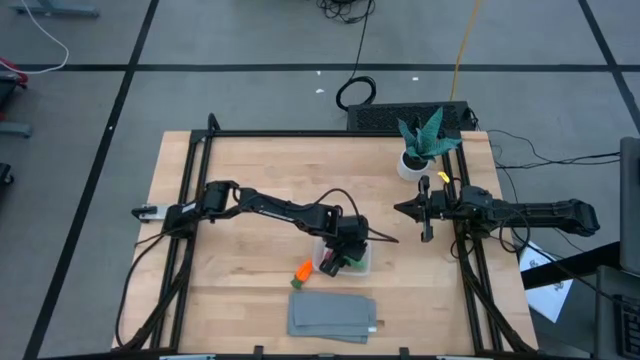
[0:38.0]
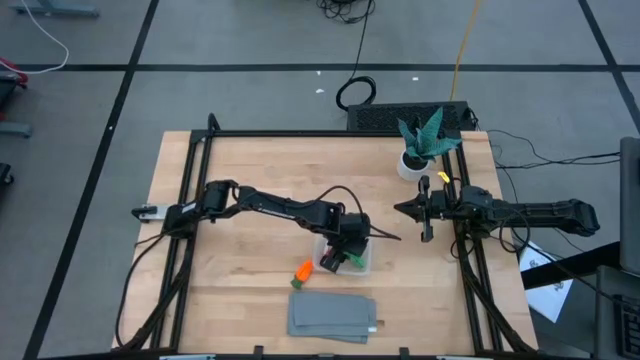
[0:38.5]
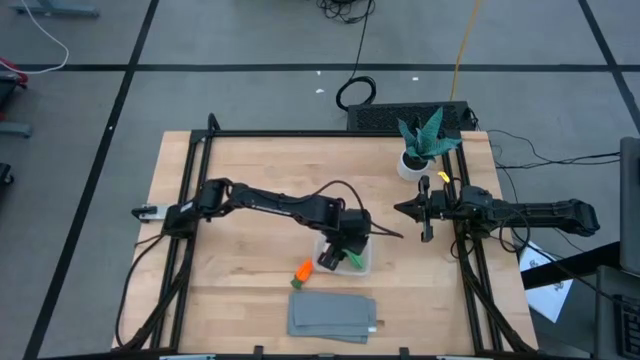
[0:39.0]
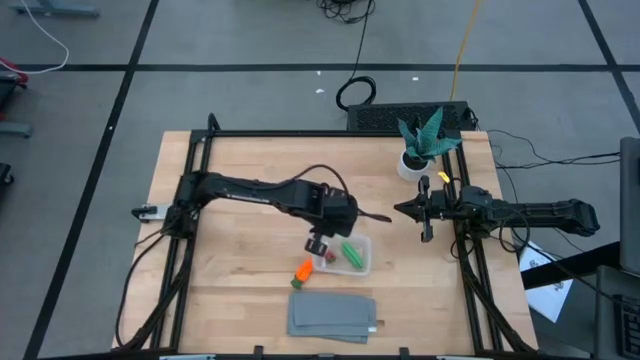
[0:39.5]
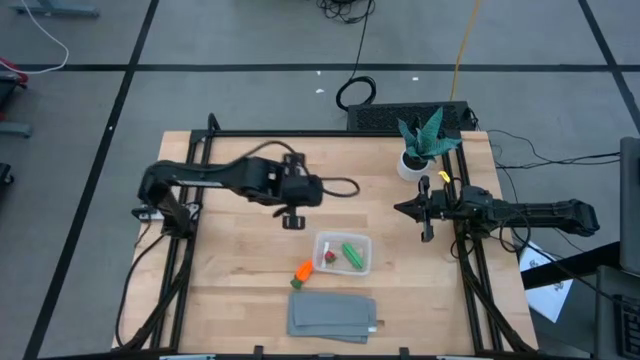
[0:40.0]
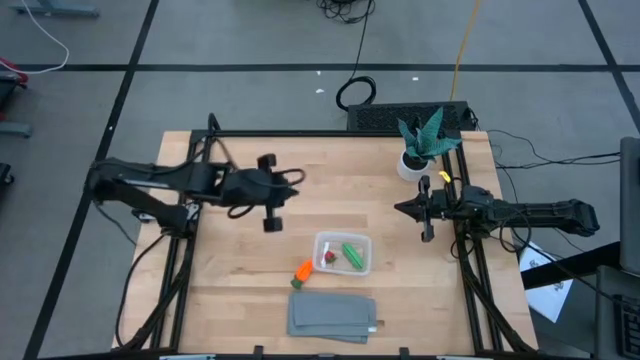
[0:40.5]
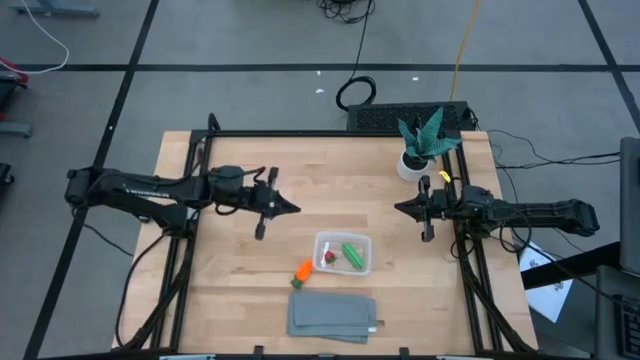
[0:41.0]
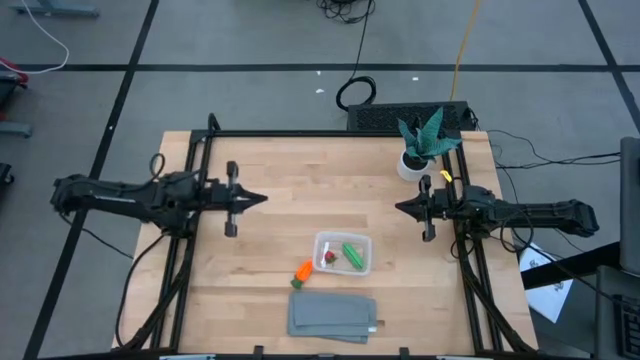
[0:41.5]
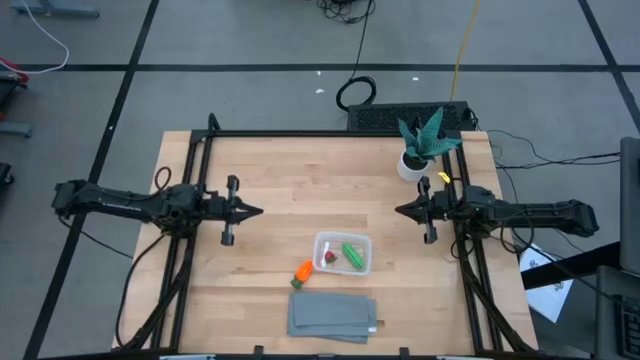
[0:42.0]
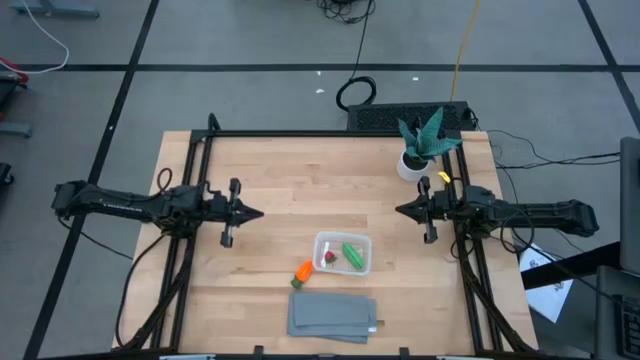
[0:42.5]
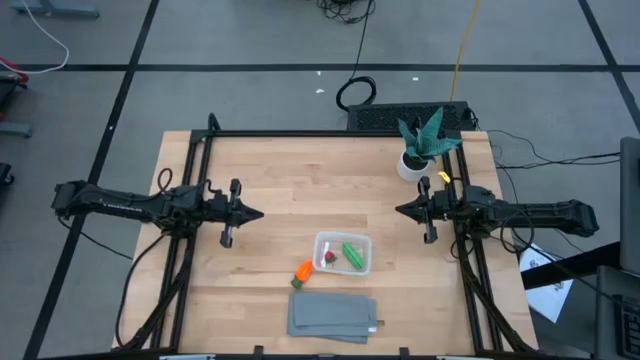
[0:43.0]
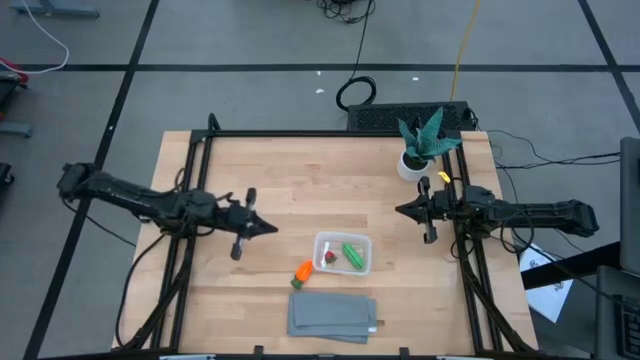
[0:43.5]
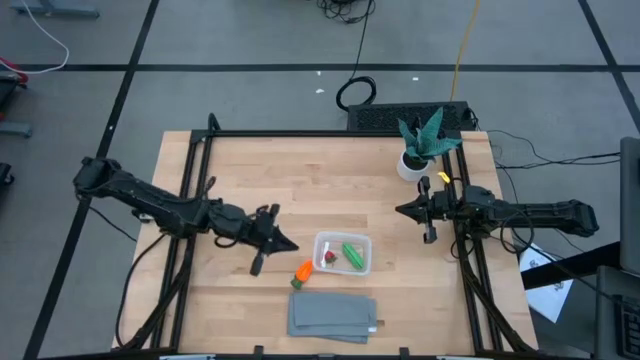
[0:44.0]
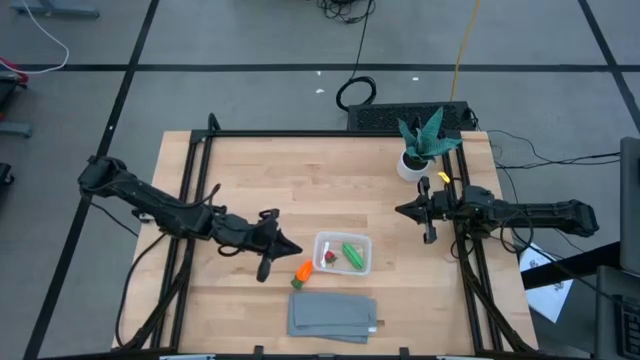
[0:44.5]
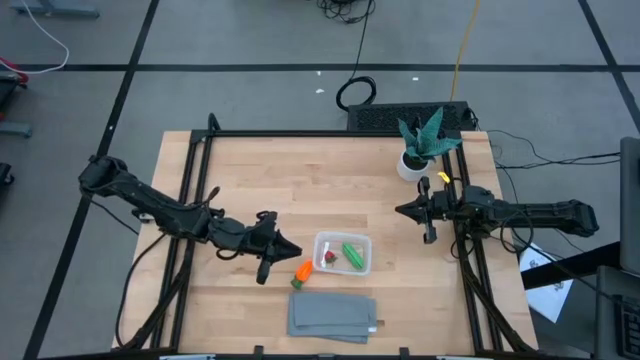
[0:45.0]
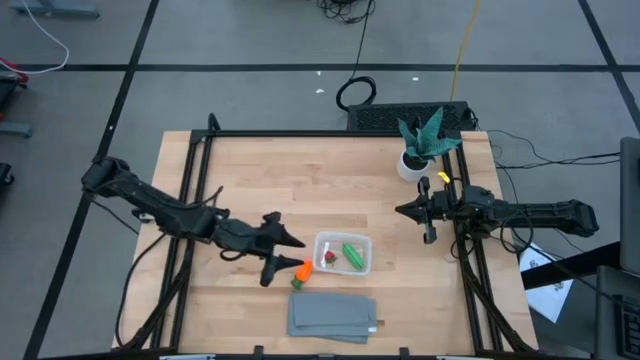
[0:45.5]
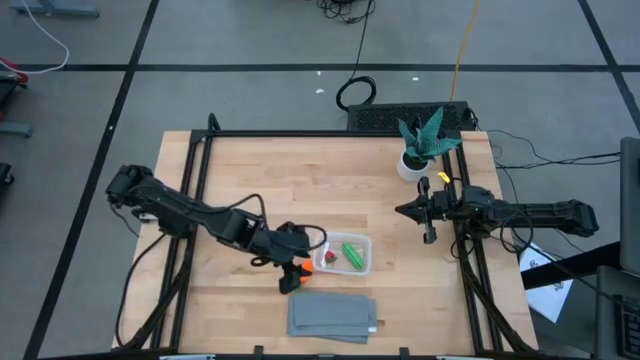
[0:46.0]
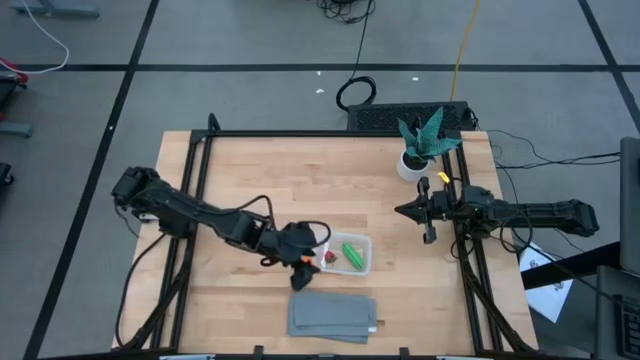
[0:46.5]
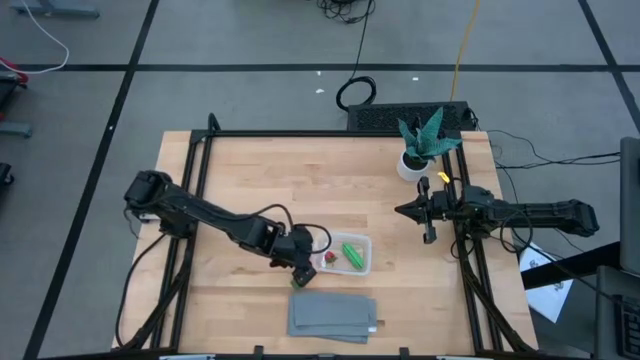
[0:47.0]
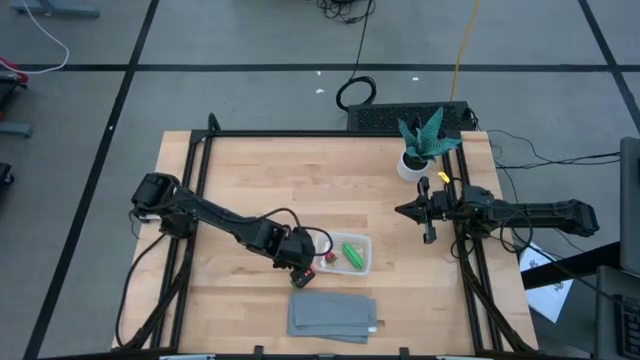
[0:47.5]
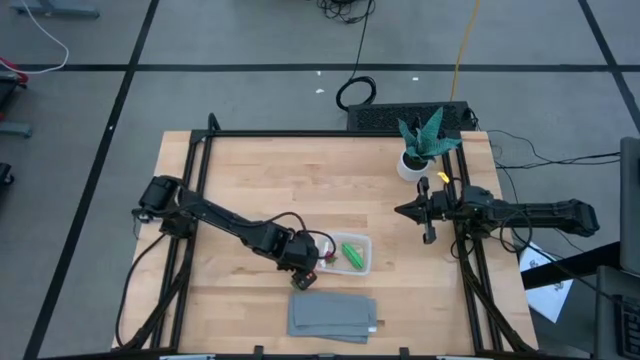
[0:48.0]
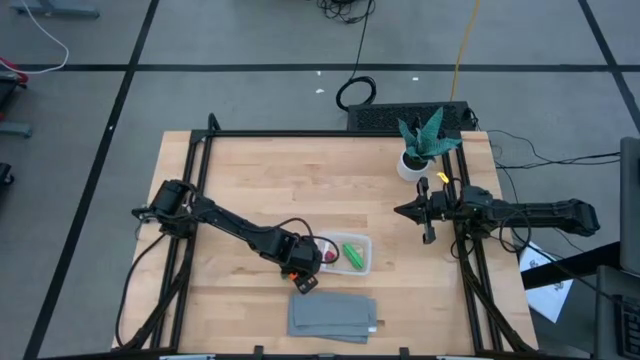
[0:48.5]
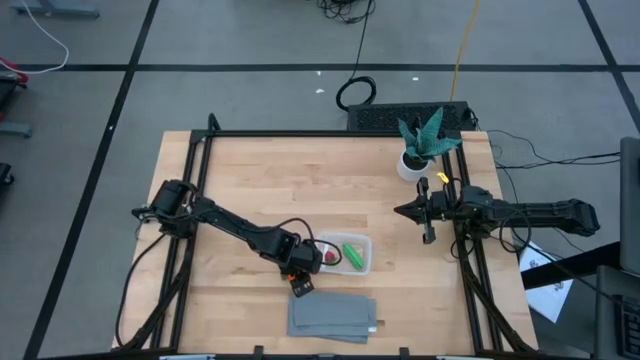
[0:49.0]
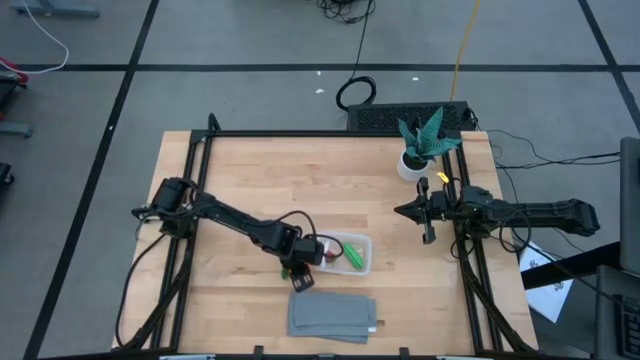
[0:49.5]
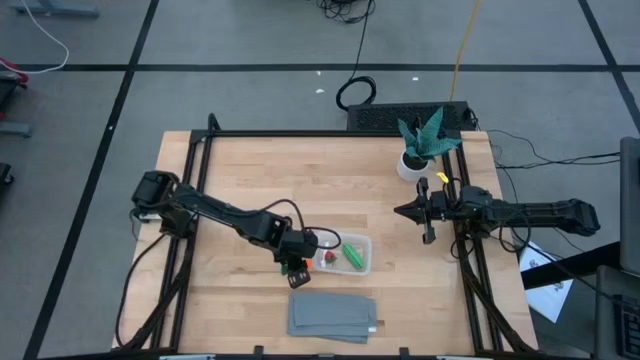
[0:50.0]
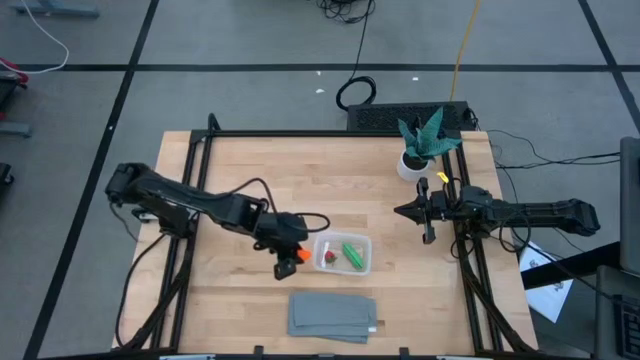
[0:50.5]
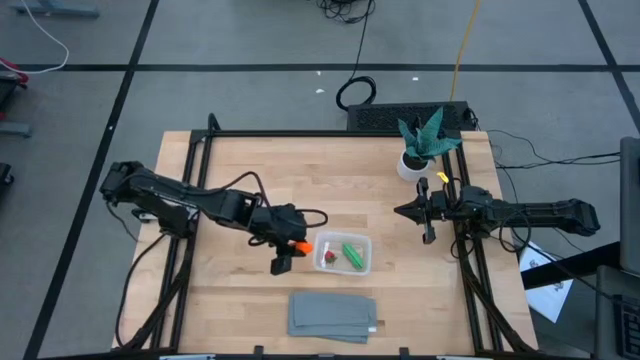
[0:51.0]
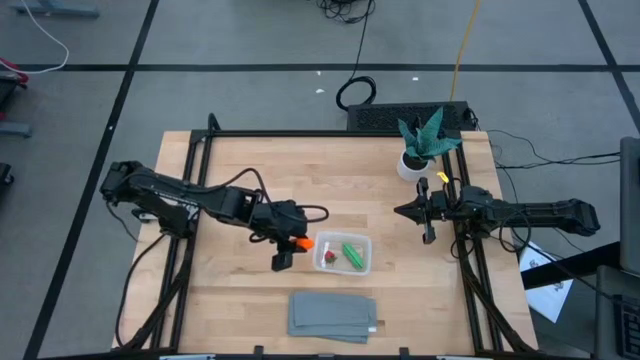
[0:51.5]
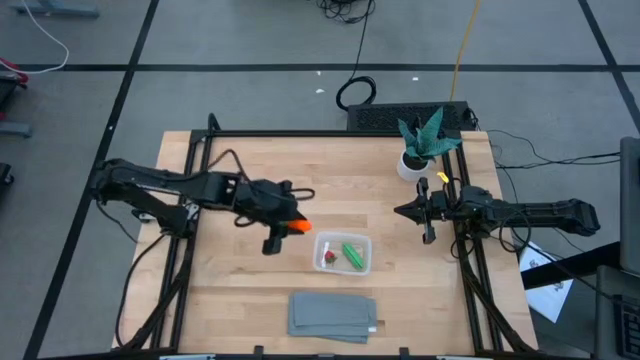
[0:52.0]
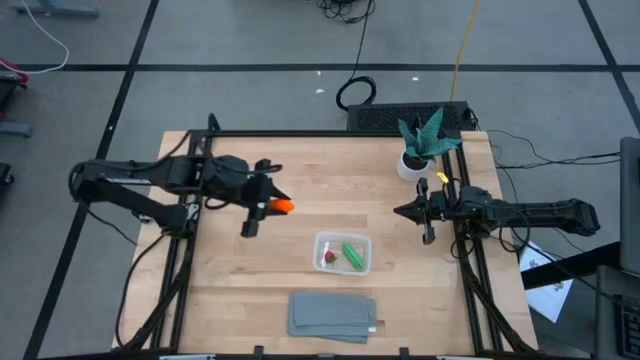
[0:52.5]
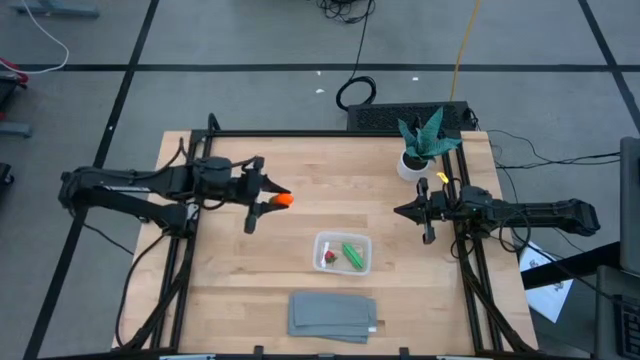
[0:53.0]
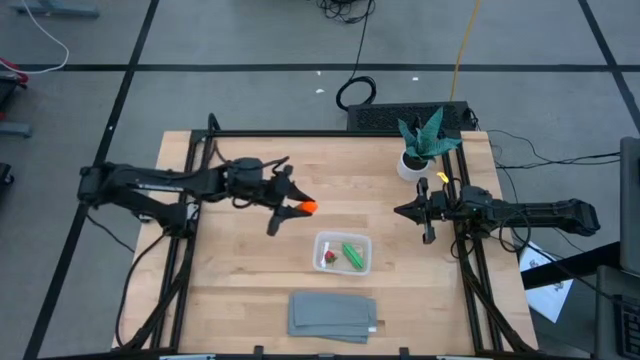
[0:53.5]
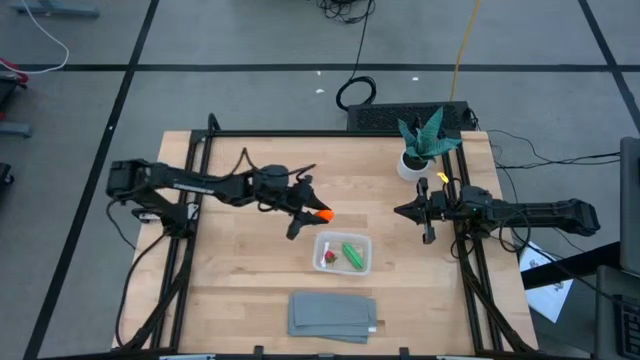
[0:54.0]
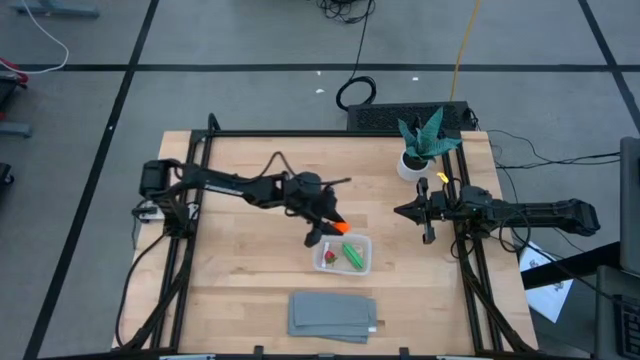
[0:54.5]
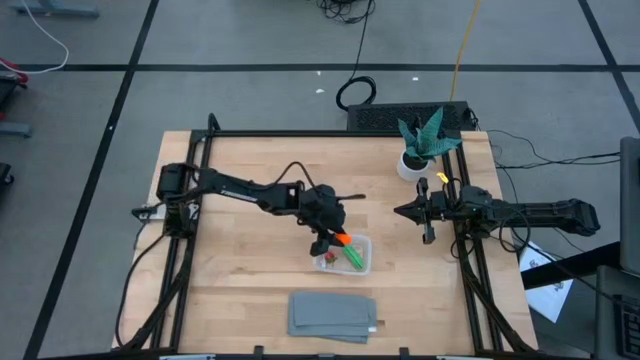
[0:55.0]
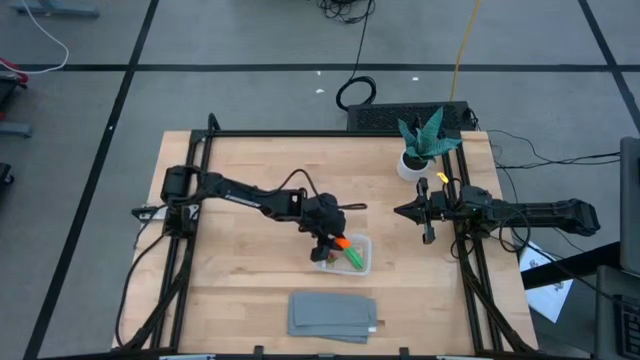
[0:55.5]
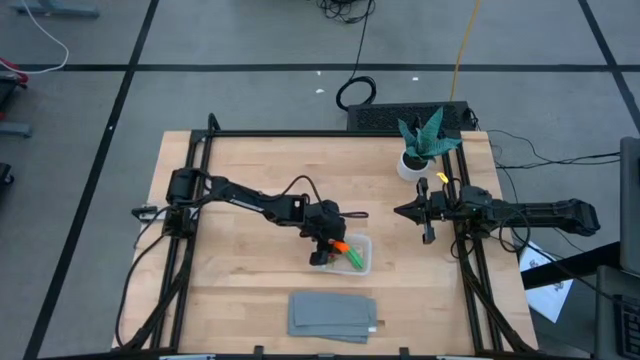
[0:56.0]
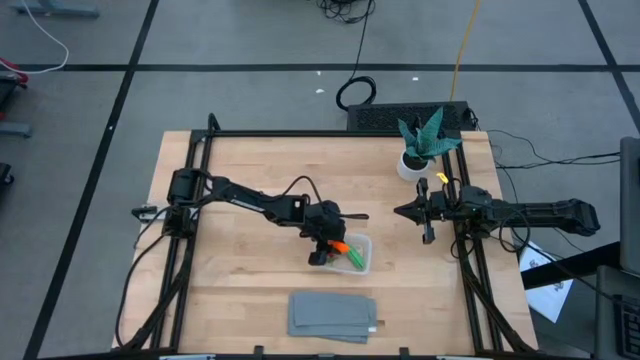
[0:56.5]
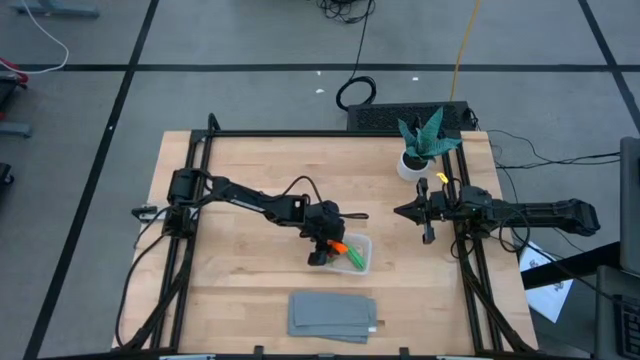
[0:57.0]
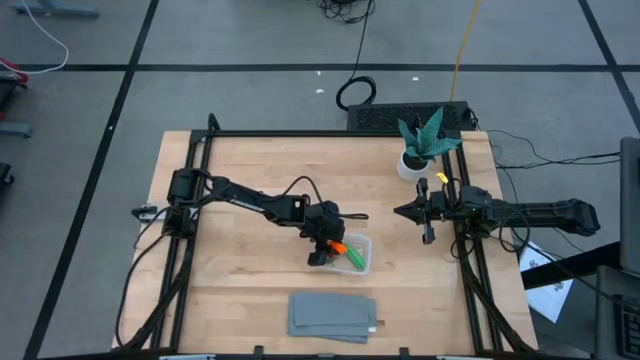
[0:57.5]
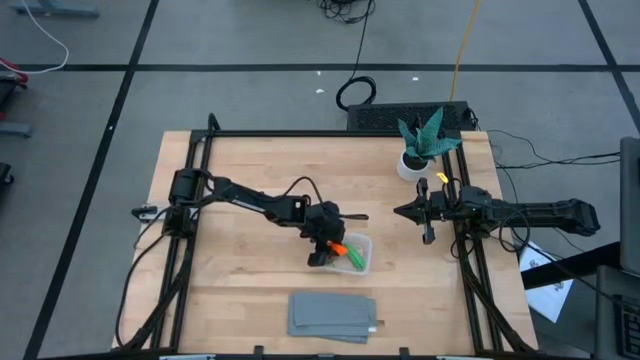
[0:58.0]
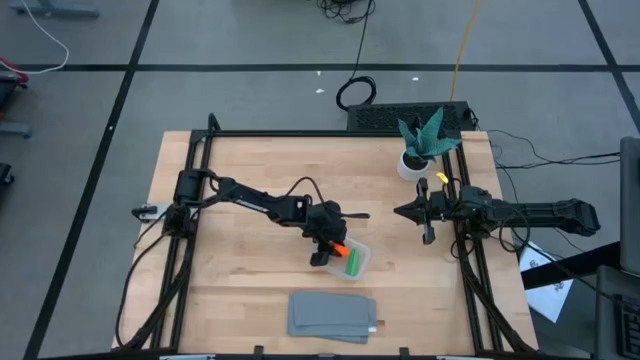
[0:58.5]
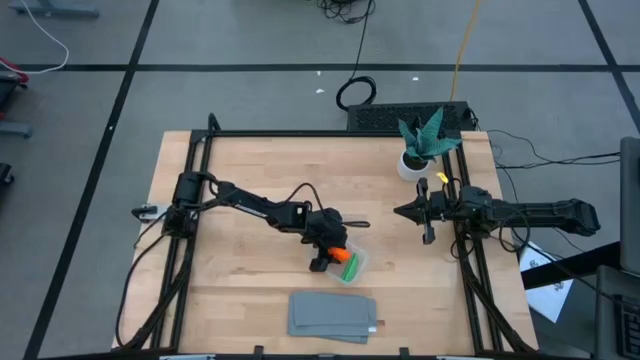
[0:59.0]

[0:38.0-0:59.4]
Task: Pick and placing Produce into tupperware
Put the orange carrot into the transparent bin
